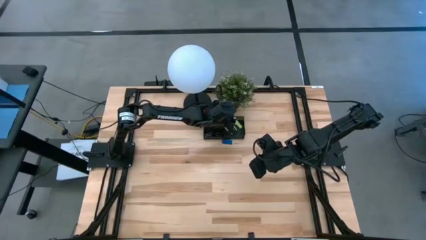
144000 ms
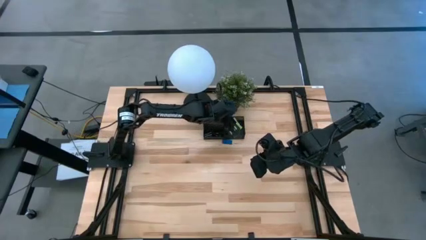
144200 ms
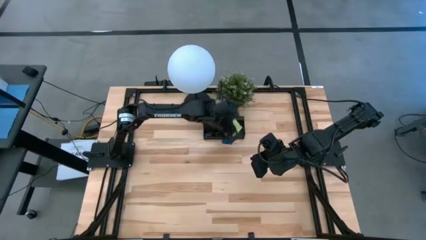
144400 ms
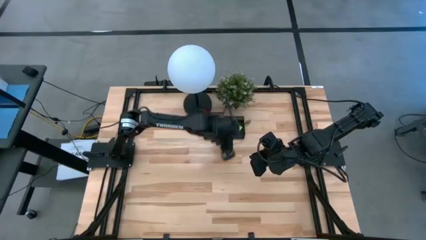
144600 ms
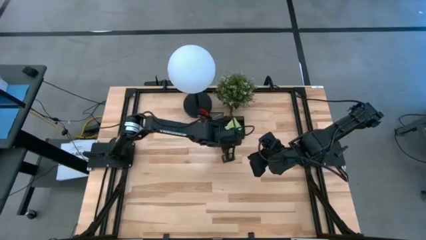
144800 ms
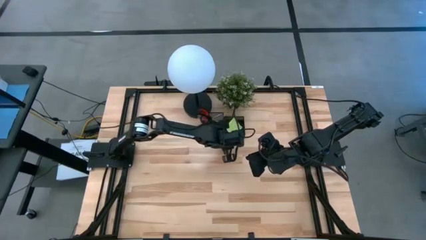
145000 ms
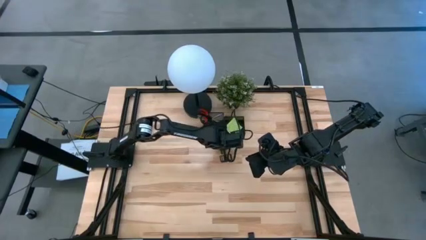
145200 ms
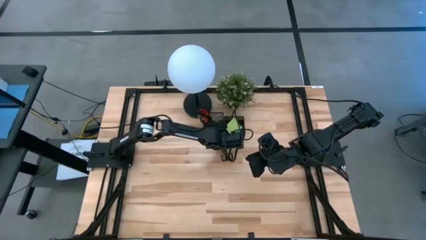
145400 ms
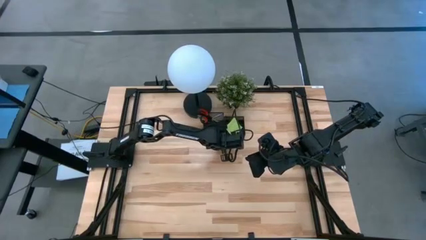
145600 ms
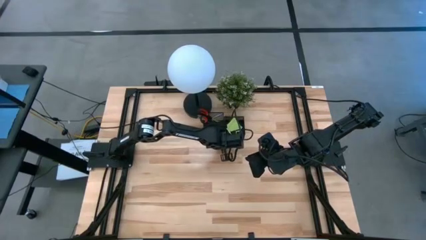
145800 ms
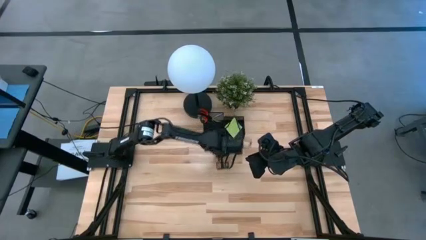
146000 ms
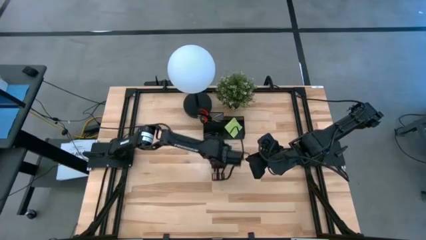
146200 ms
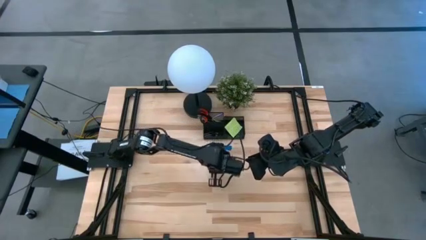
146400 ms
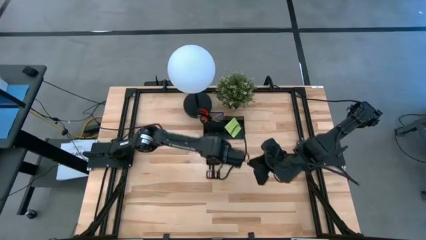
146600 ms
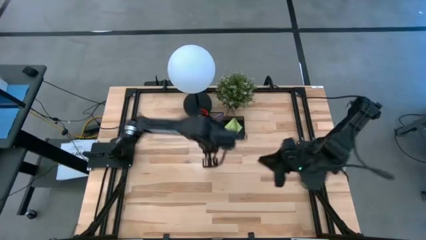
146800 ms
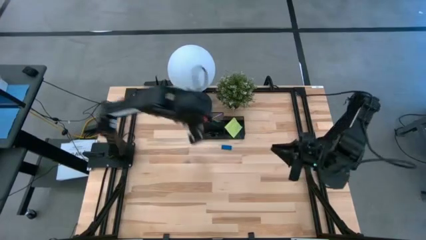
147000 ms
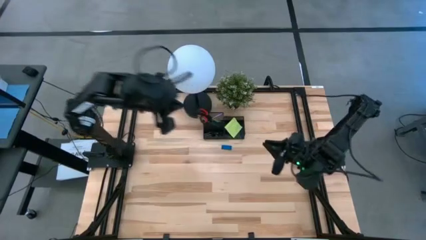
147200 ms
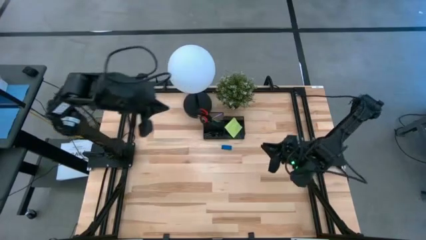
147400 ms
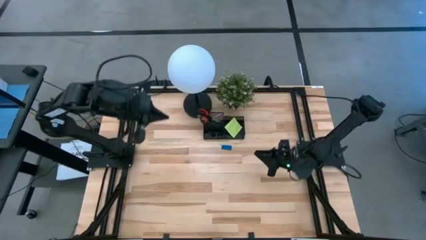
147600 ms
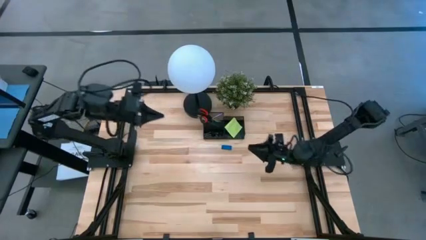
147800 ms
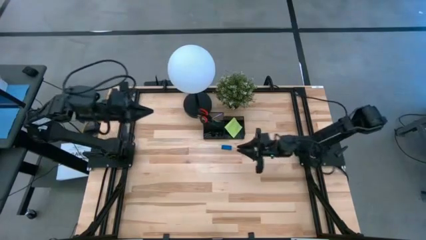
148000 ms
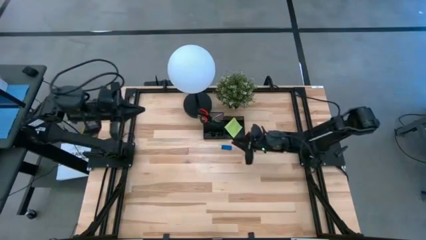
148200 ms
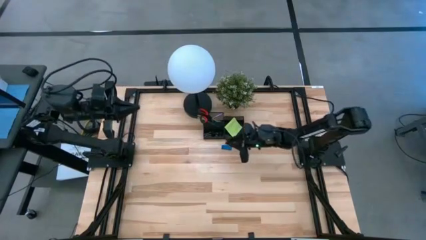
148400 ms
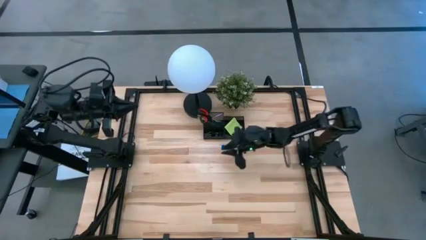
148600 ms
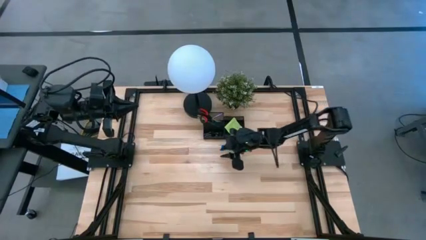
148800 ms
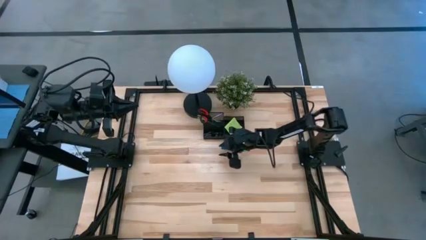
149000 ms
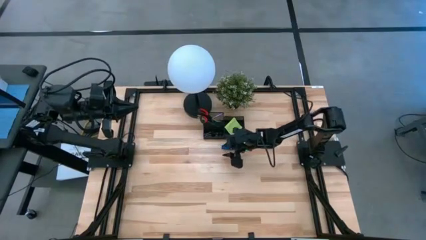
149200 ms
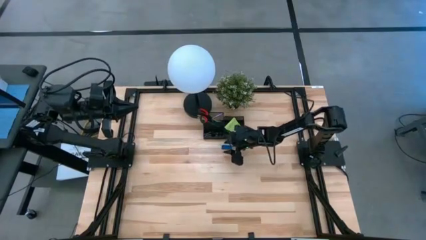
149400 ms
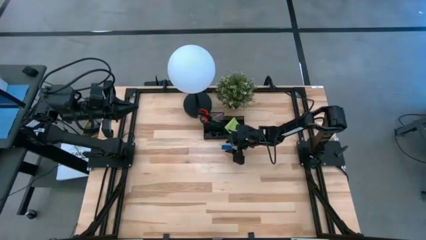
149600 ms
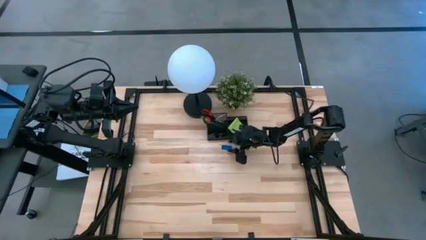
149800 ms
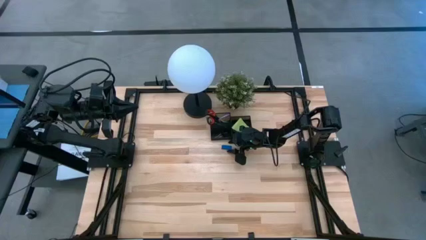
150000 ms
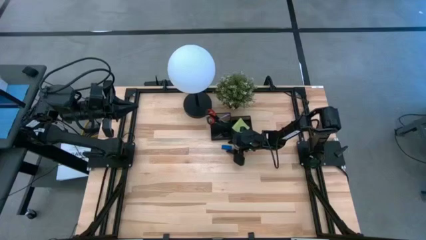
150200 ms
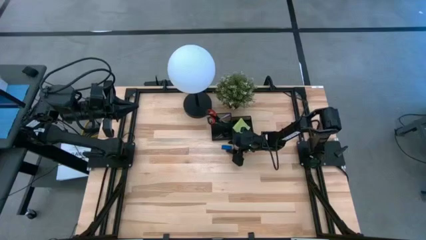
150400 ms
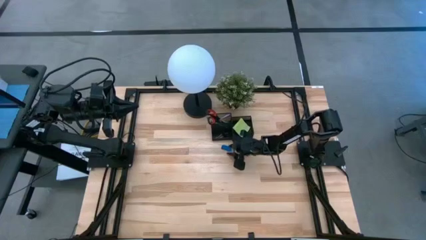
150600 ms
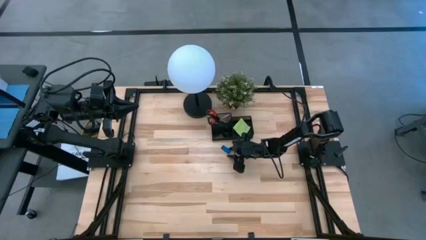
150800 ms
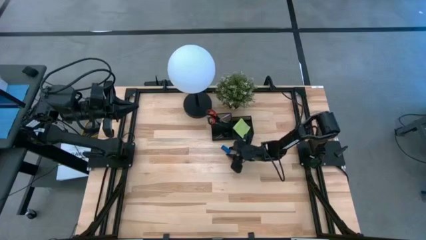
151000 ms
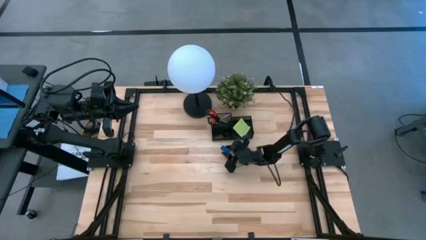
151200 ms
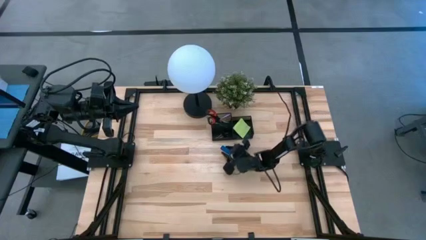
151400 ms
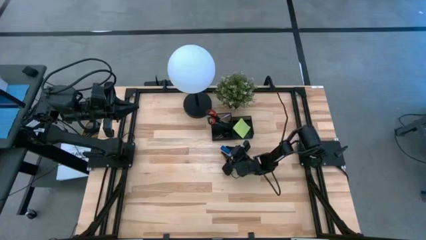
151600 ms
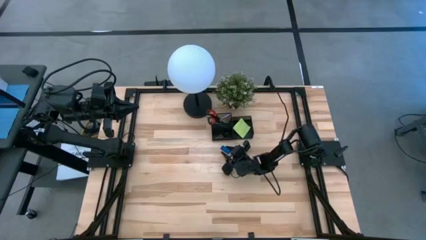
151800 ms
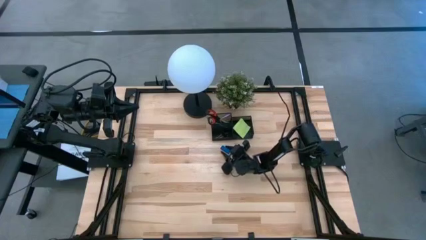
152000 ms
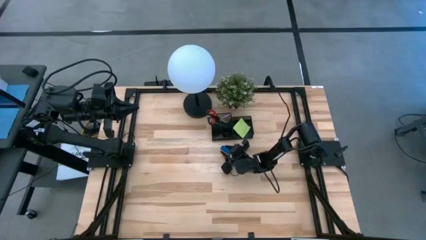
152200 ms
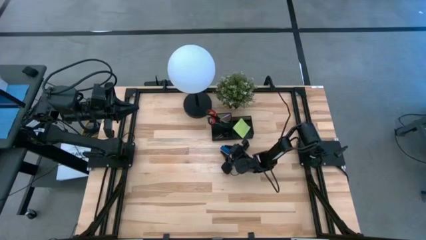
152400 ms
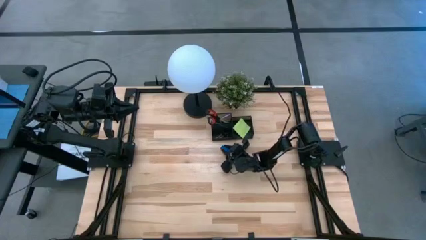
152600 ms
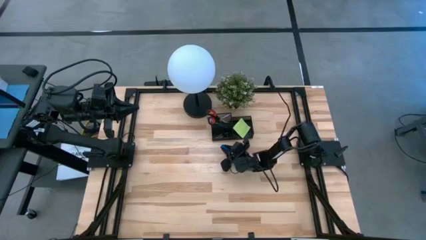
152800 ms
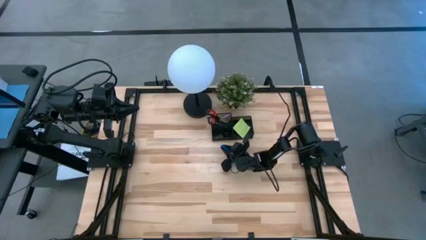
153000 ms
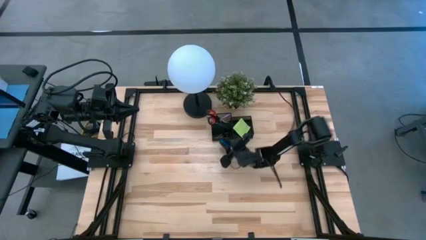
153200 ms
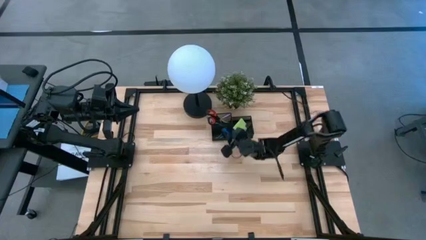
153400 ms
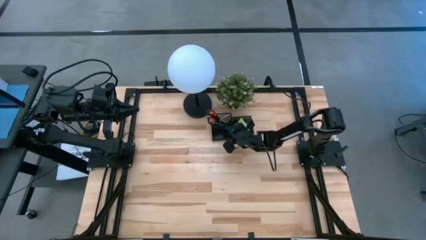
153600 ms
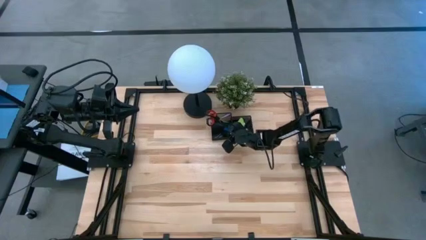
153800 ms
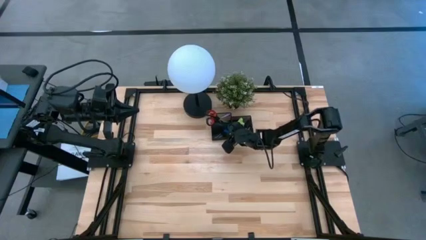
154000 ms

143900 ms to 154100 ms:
Task: Pick and place office supplies into organizer
Put the blue eraser into the black desk organizer

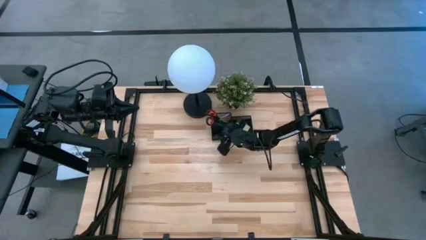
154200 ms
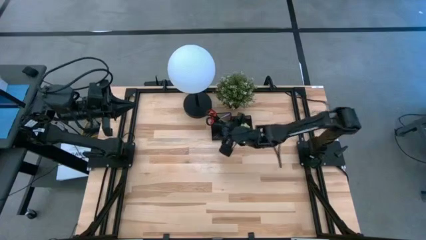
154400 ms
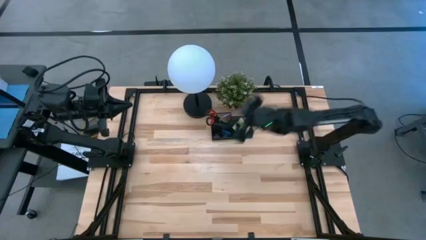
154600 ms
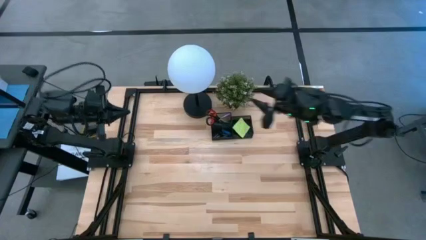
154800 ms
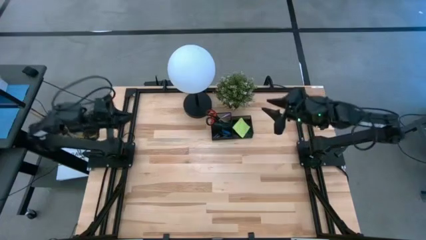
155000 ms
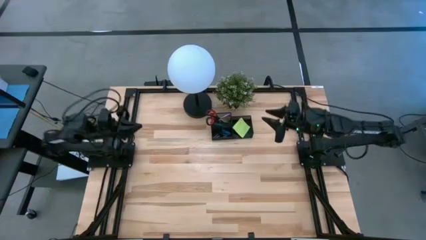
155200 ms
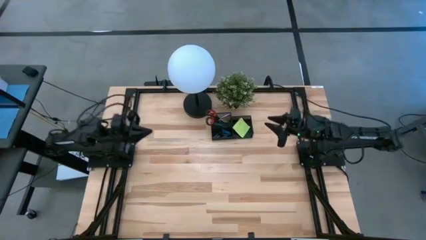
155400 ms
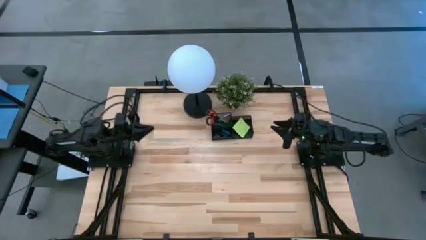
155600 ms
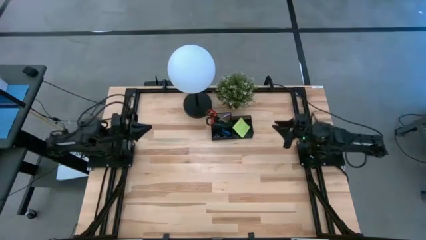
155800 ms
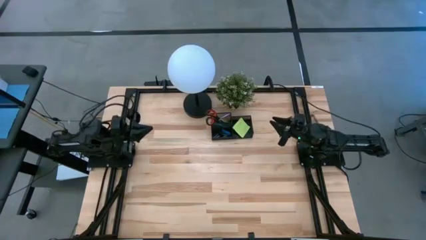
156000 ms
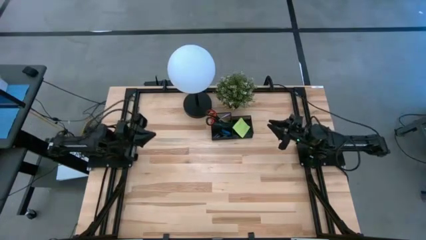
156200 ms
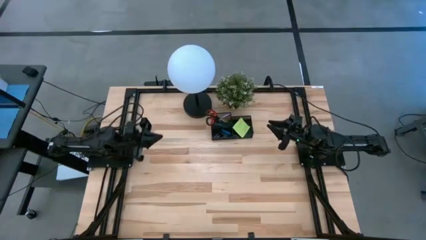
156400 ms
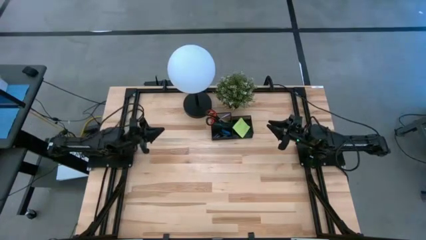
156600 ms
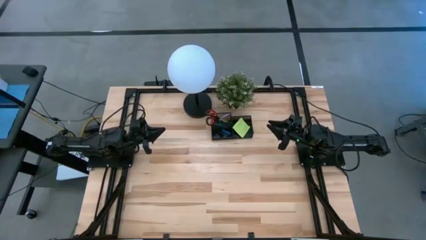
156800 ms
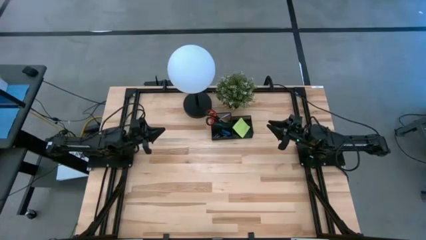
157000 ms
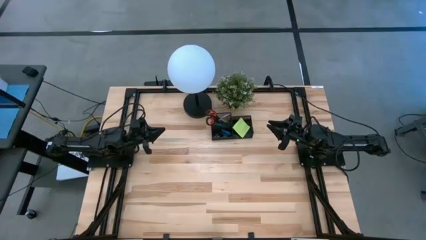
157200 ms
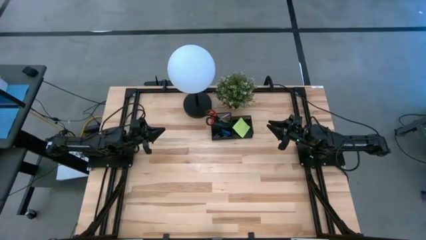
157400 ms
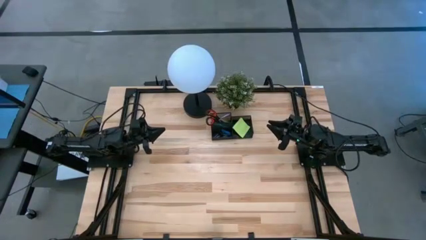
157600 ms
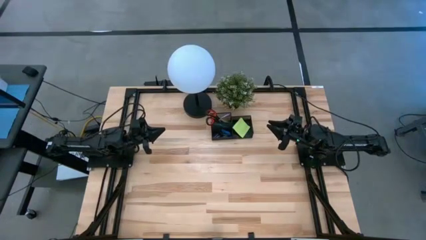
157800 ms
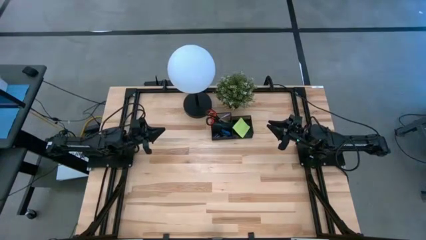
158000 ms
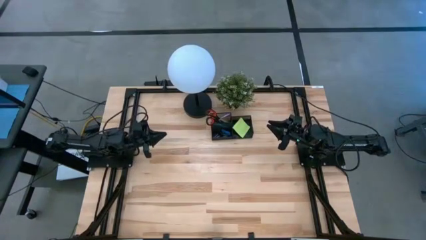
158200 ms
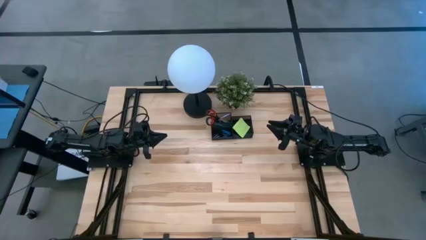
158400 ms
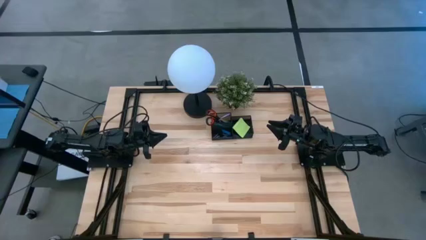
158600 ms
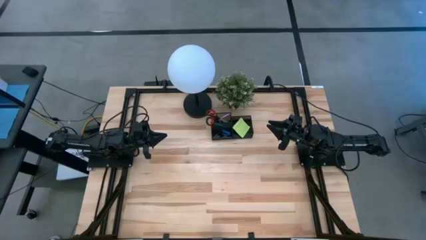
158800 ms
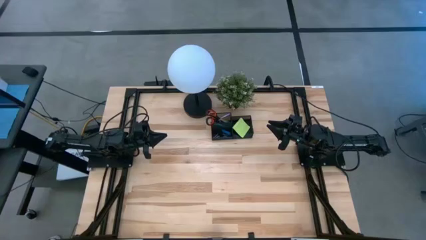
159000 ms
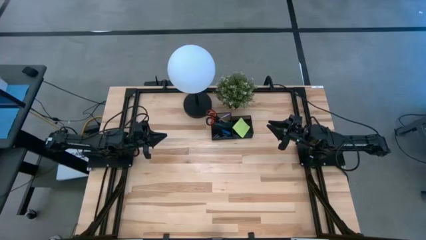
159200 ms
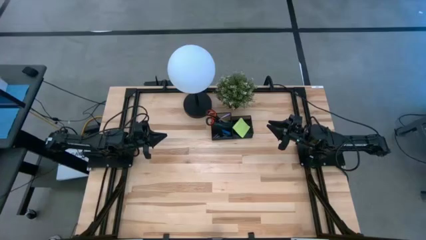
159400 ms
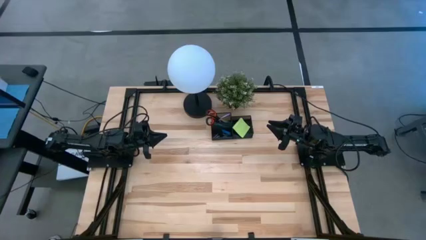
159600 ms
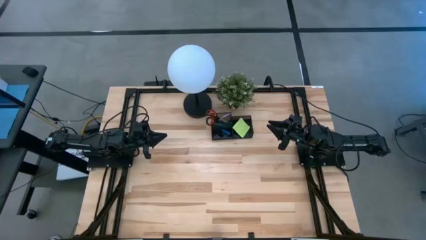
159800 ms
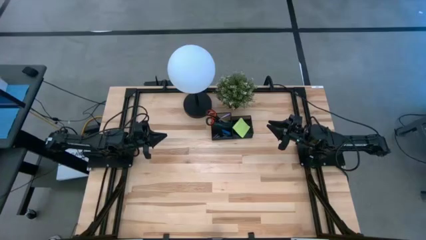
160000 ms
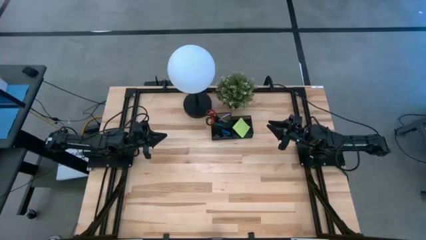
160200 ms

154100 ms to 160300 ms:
Return to Home Position
